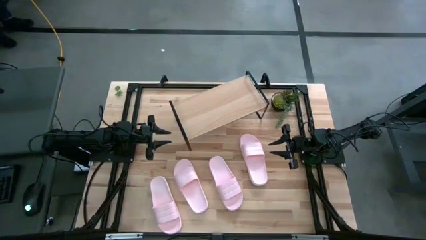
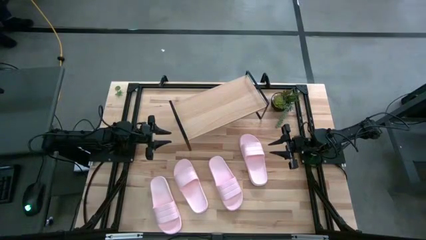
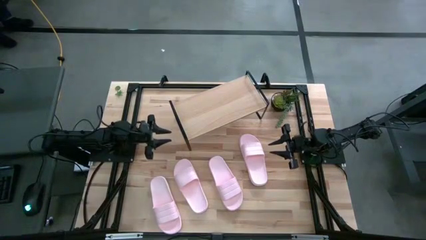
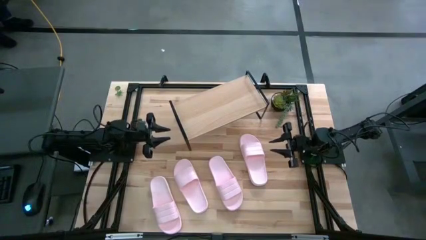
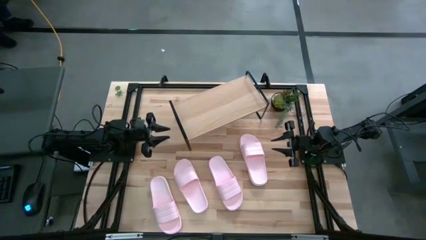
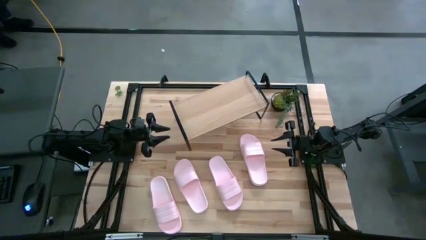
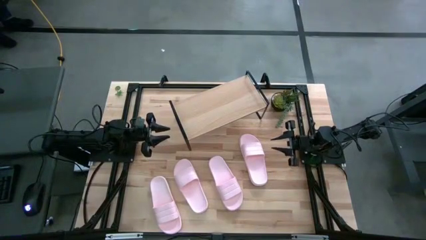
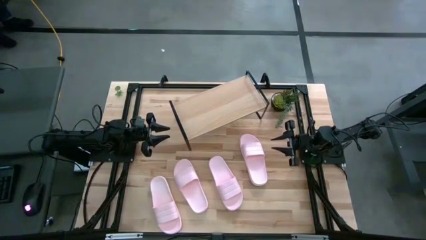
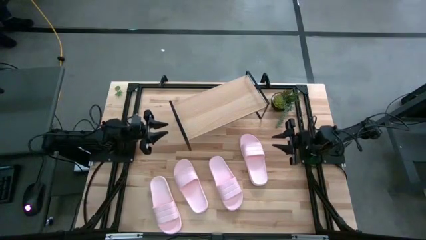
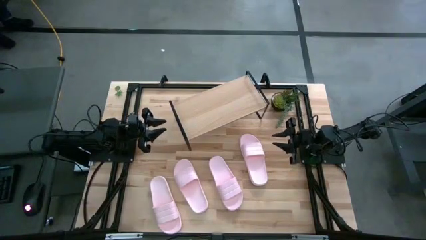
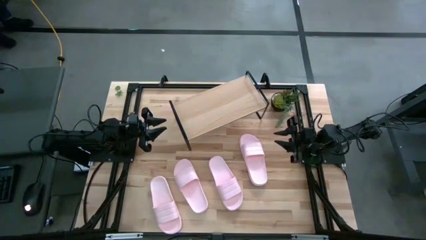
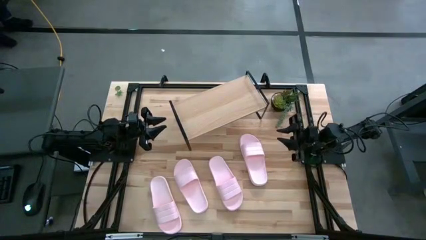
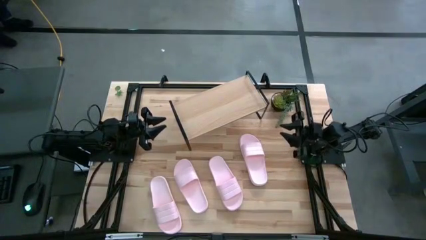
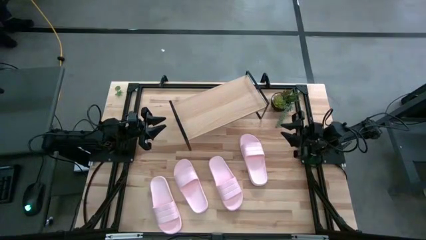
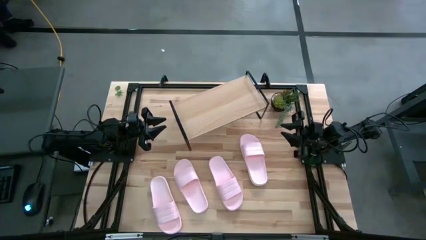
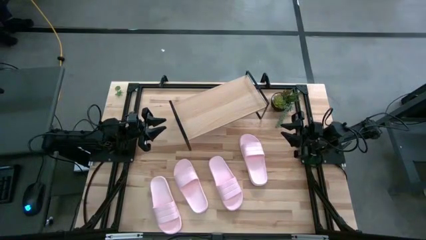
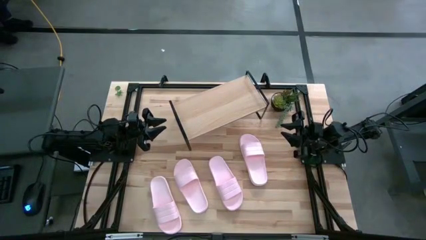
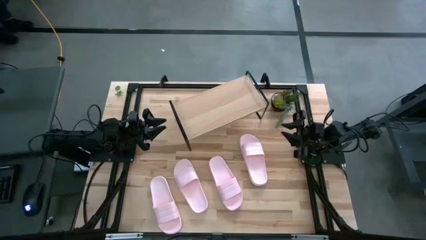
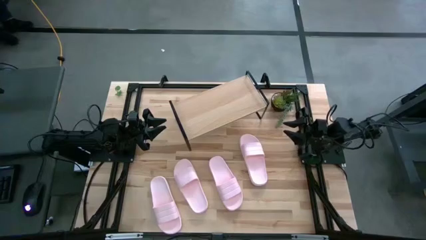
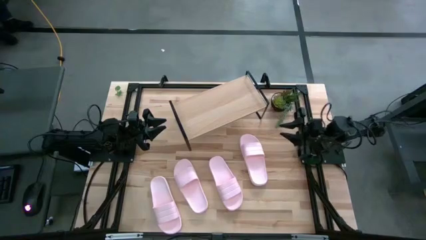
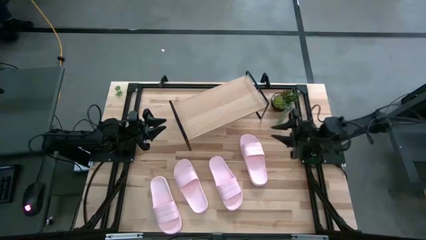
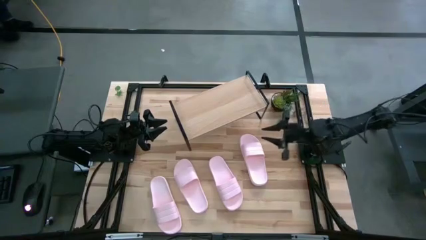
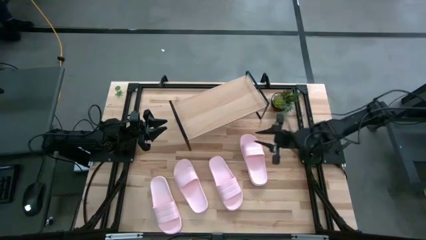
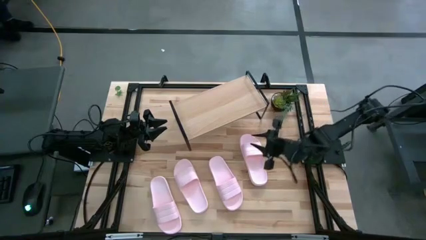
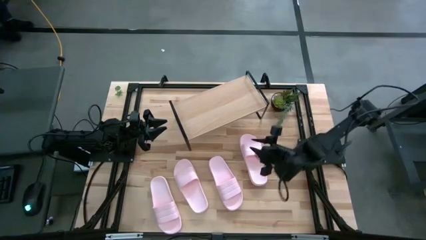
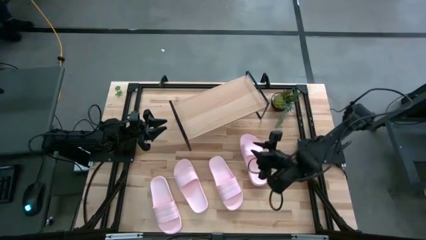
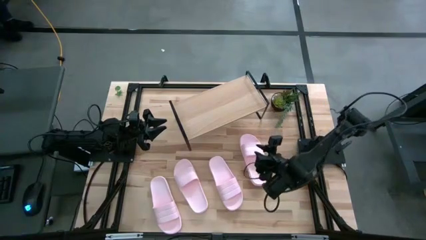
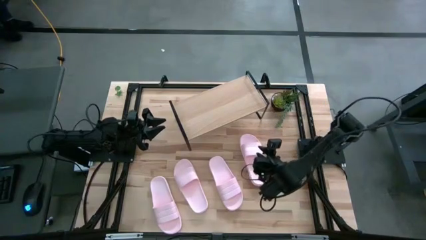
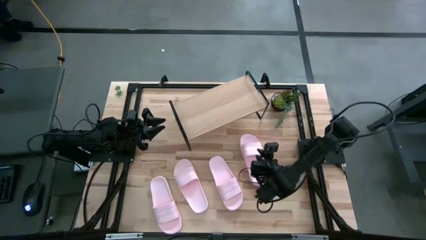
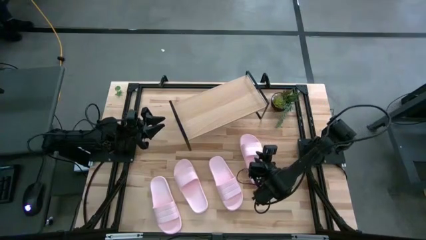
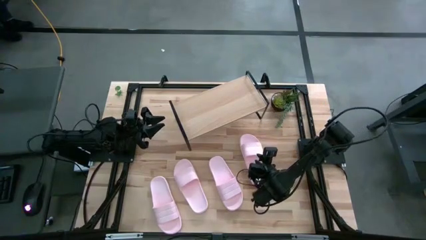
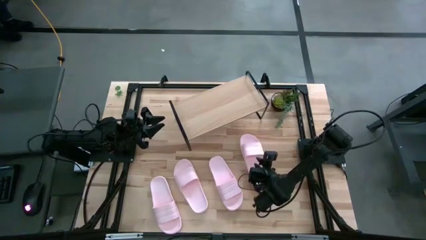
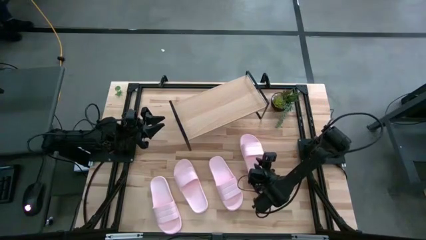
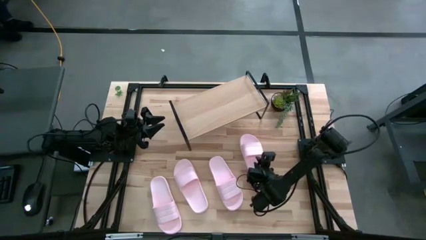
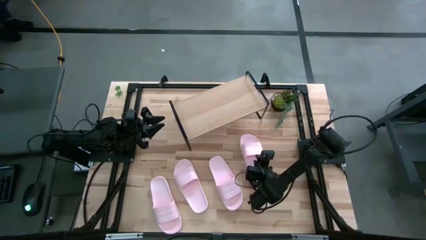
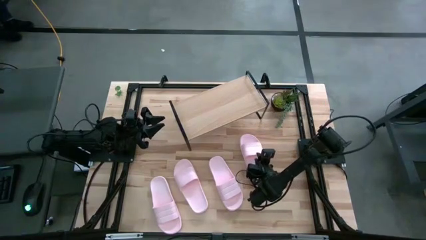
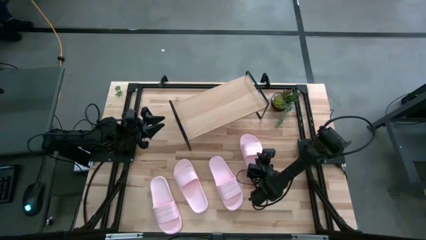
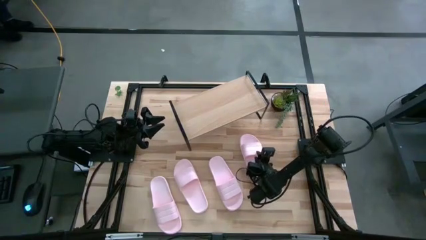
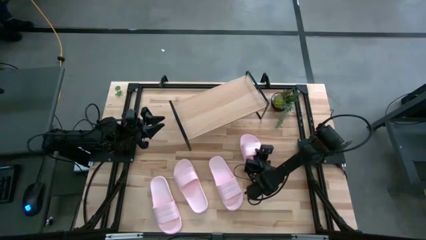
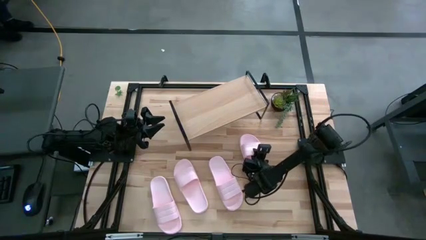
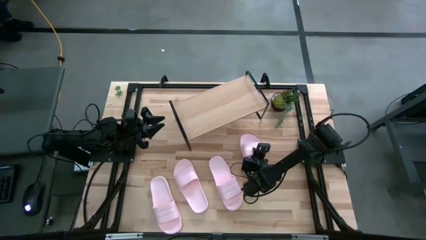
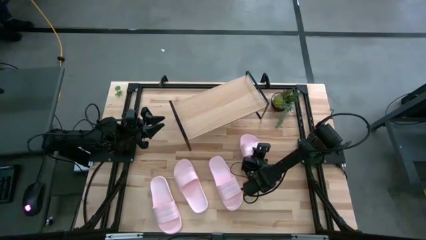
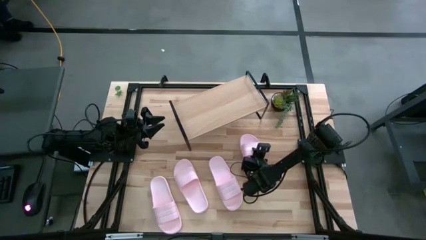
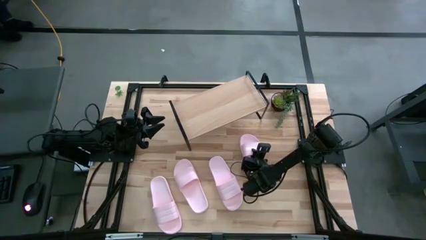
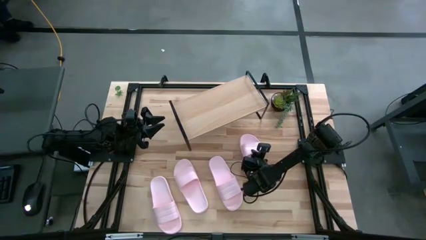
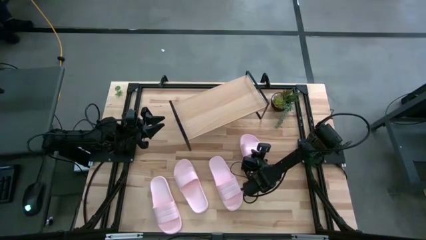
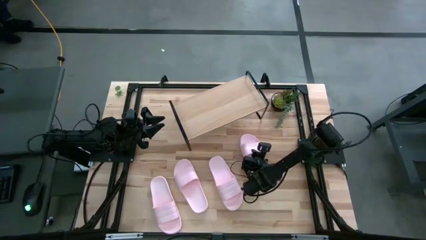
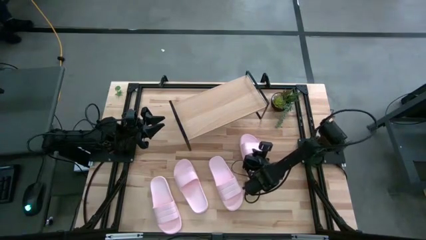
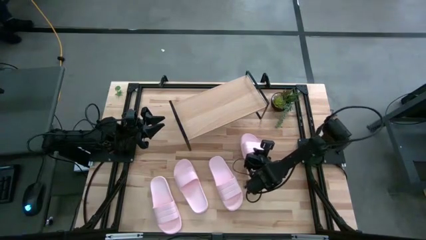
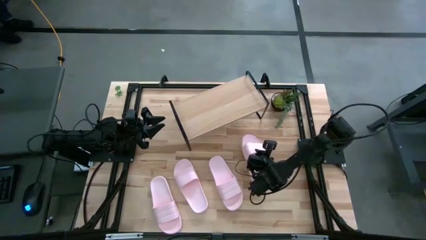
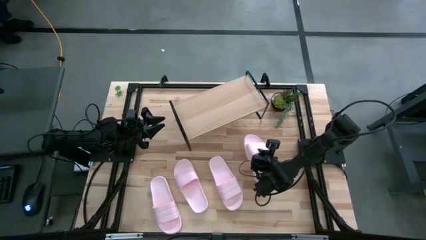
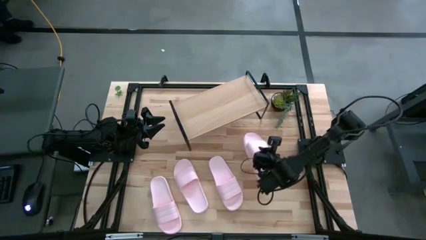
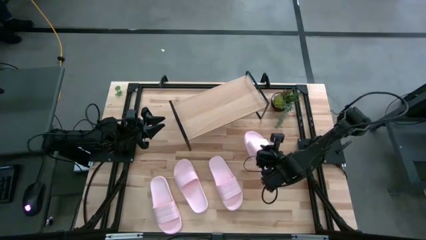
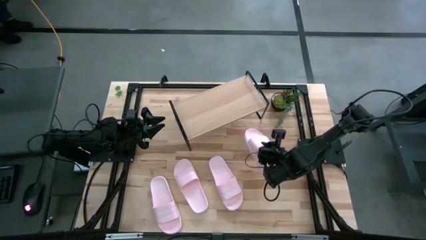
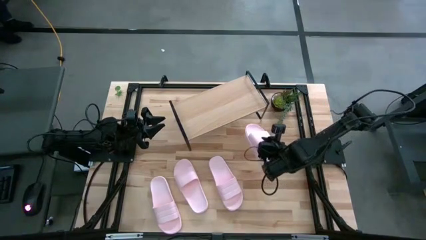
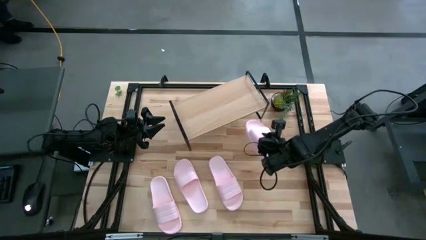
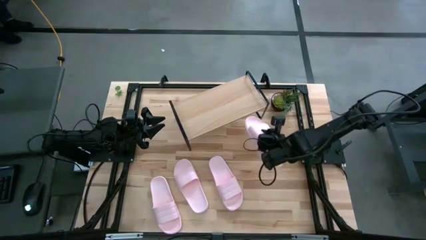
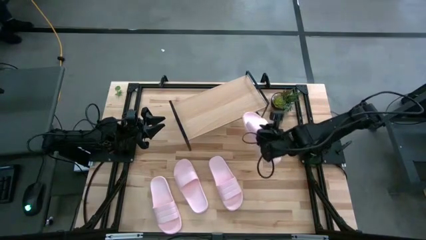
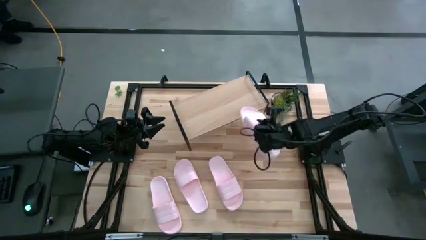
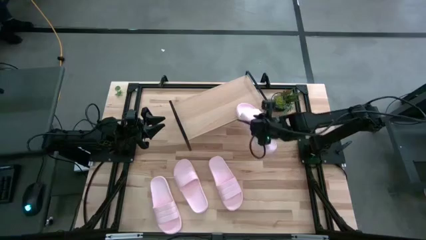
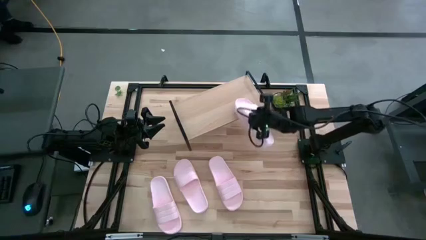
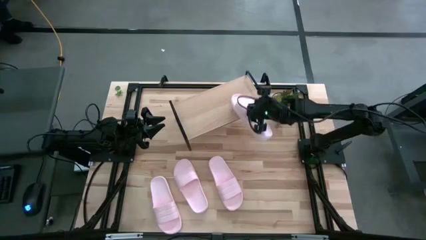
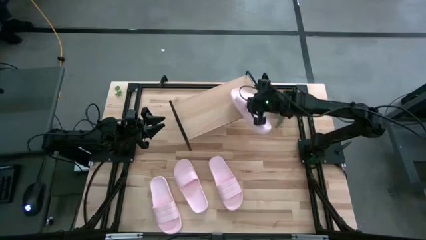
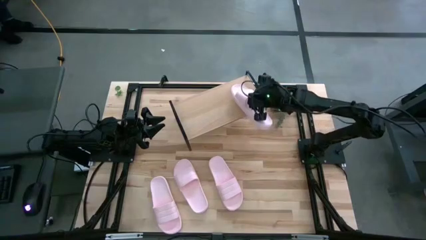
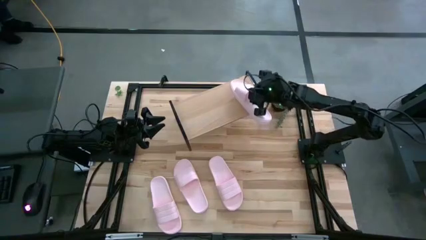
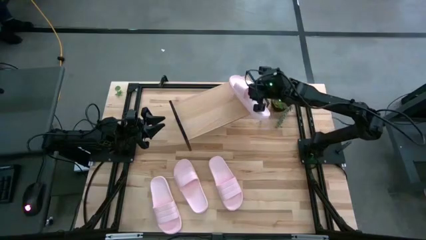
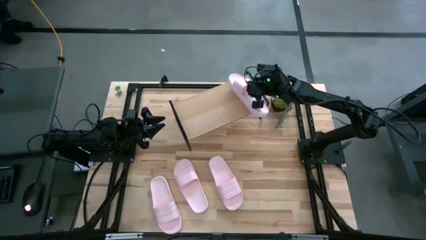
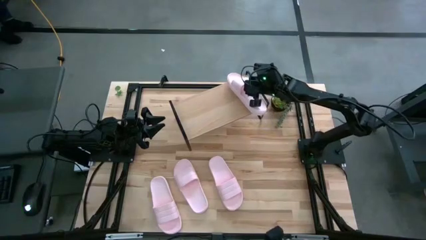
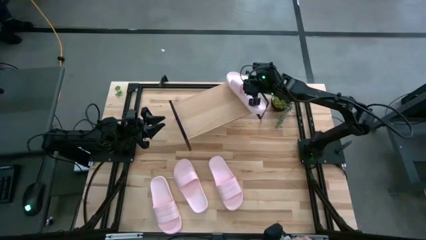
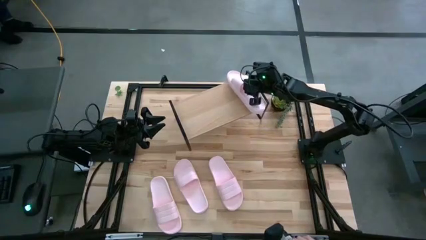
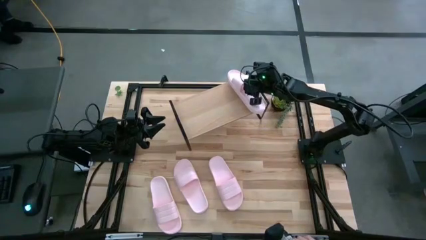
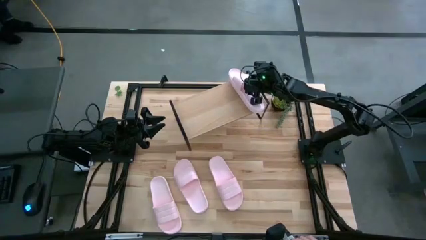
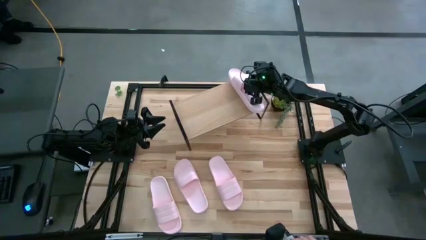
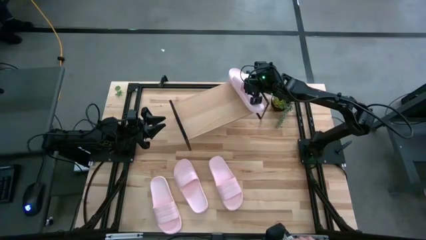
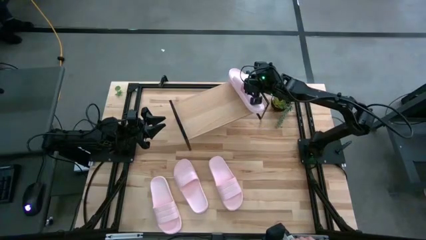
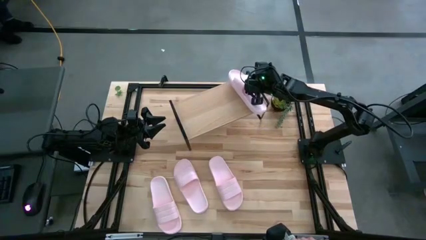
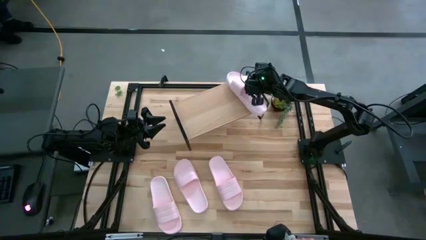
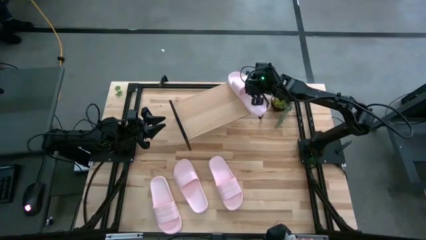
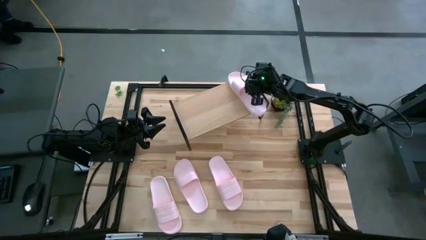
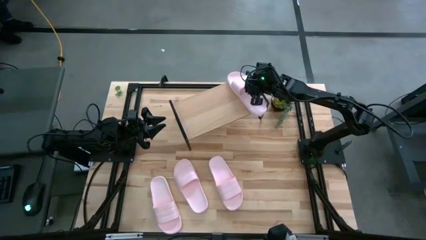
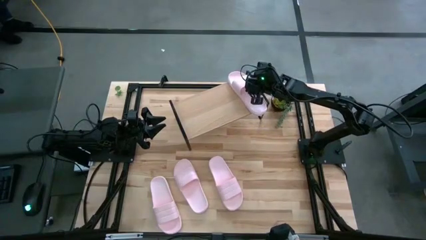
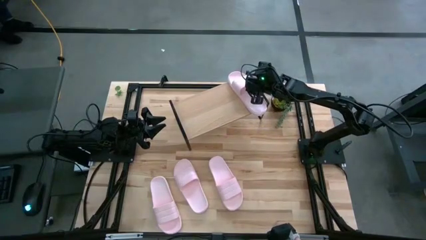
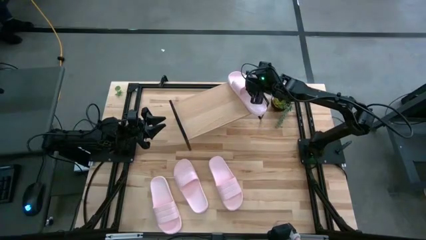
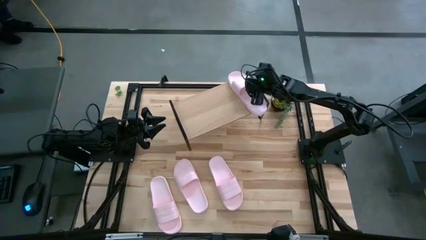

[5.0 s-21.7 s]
Task: Pick and place slides into the shelf
Put the pink slipper on the shelf
